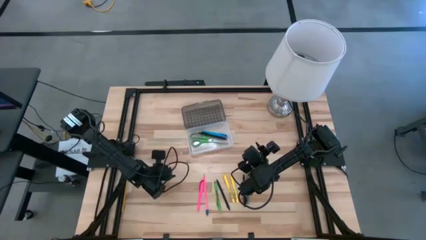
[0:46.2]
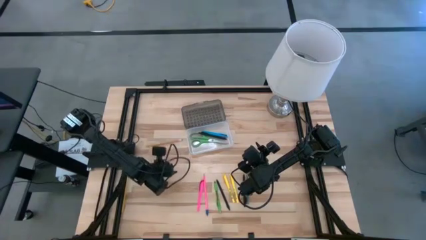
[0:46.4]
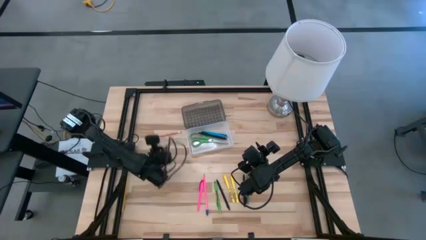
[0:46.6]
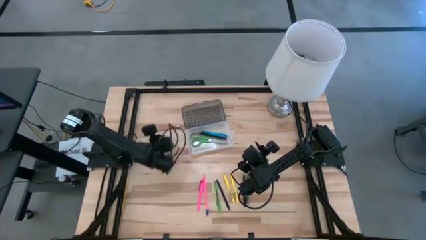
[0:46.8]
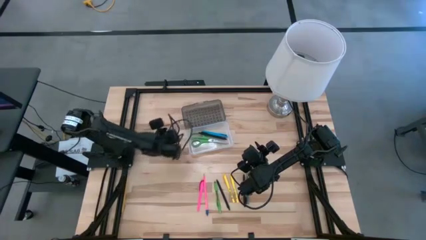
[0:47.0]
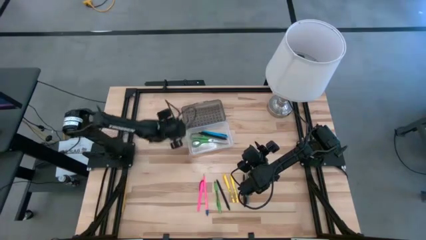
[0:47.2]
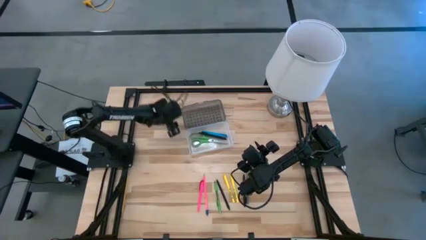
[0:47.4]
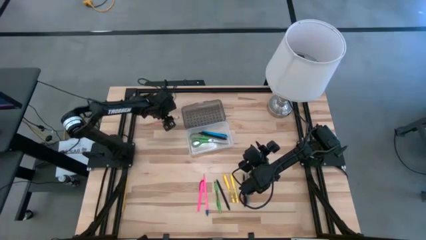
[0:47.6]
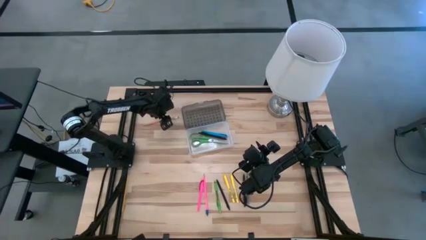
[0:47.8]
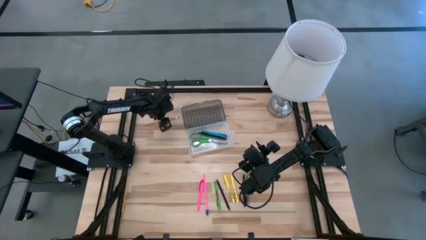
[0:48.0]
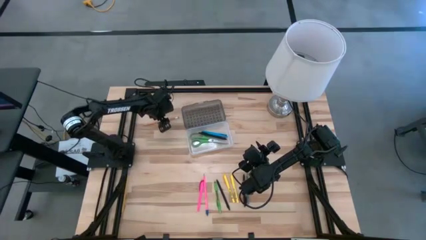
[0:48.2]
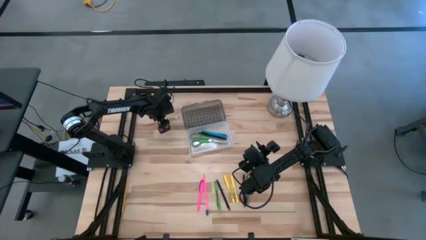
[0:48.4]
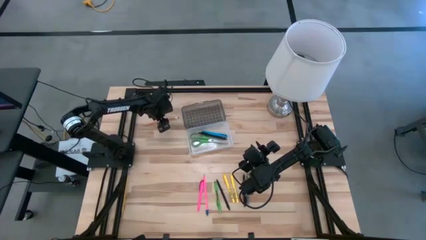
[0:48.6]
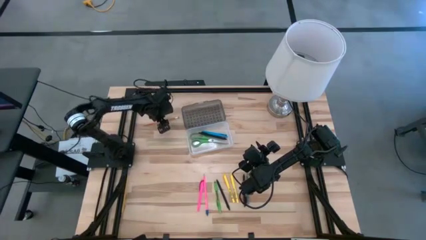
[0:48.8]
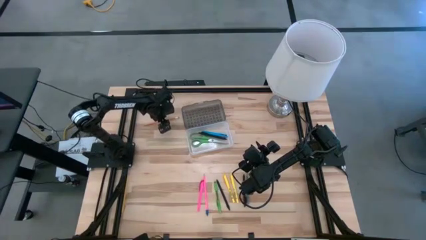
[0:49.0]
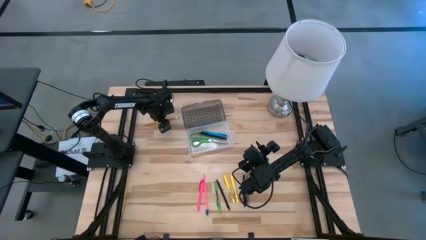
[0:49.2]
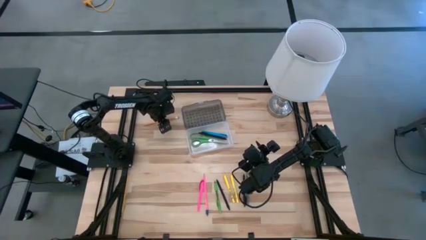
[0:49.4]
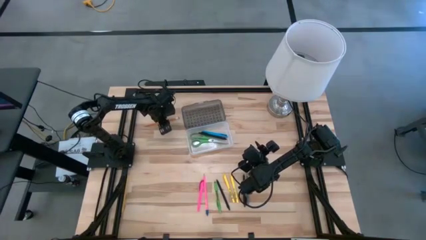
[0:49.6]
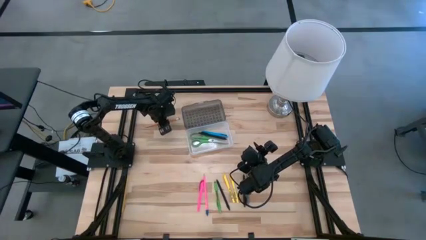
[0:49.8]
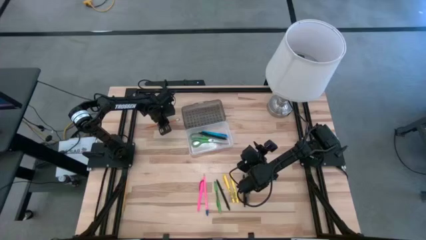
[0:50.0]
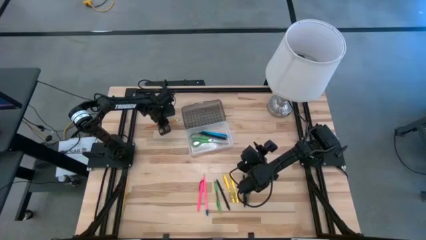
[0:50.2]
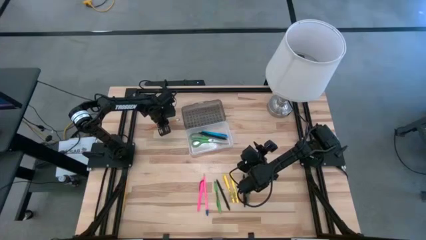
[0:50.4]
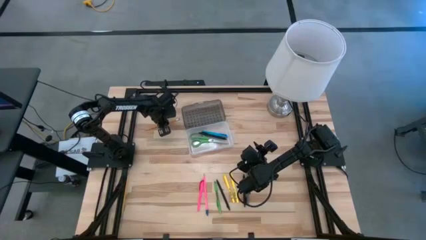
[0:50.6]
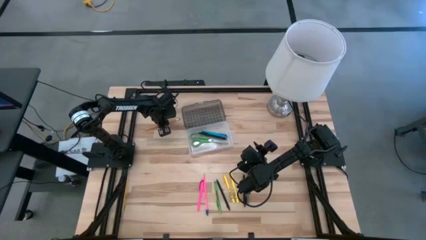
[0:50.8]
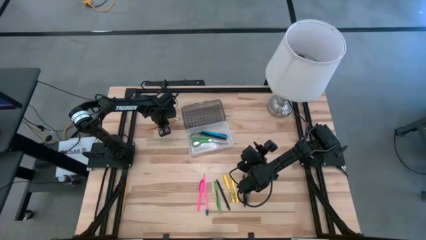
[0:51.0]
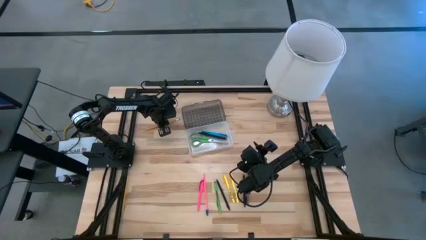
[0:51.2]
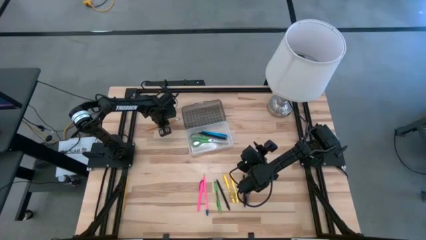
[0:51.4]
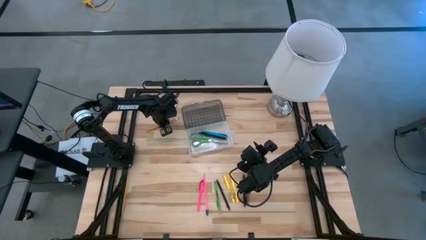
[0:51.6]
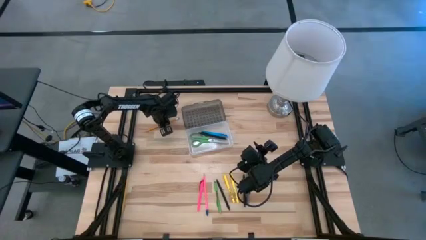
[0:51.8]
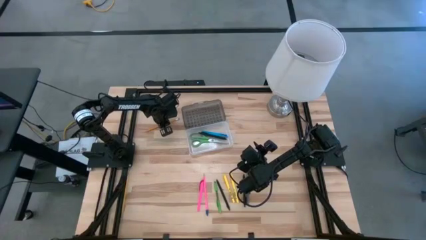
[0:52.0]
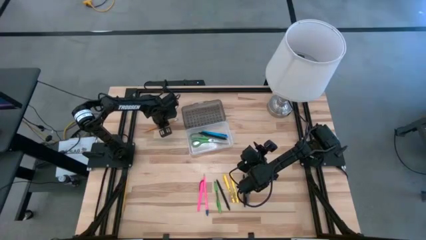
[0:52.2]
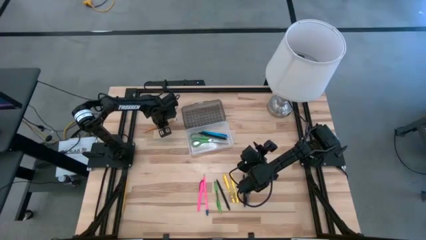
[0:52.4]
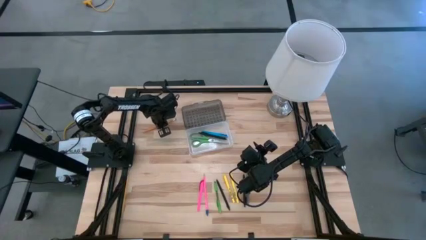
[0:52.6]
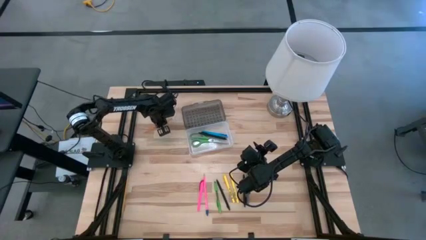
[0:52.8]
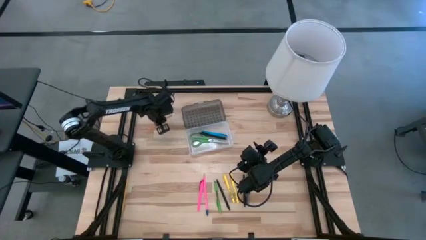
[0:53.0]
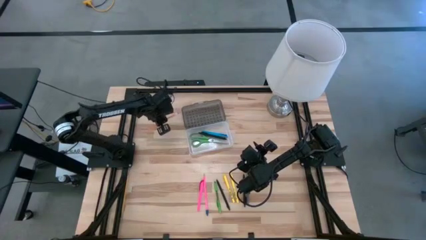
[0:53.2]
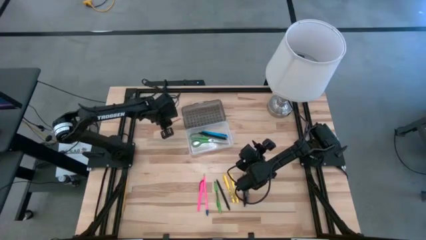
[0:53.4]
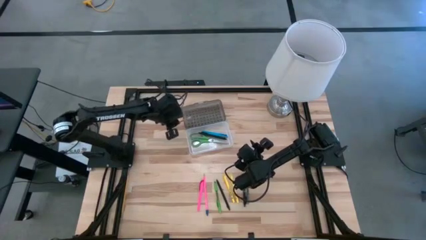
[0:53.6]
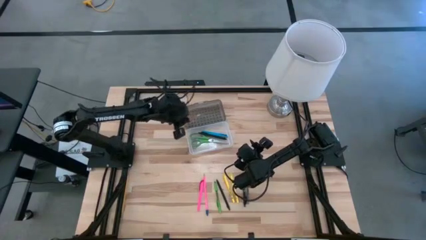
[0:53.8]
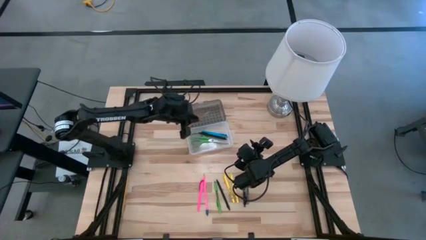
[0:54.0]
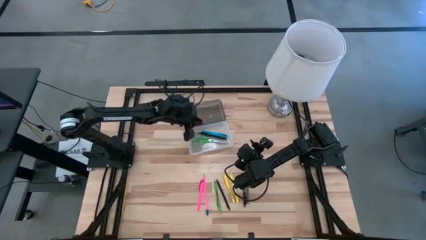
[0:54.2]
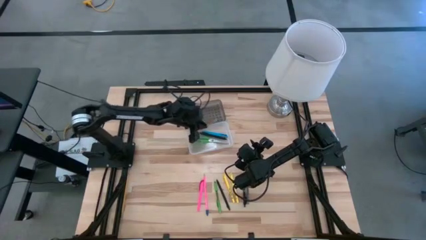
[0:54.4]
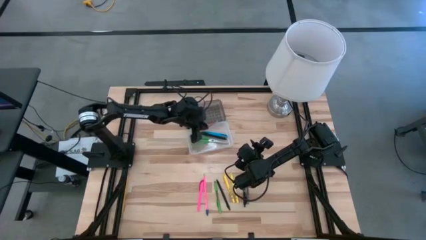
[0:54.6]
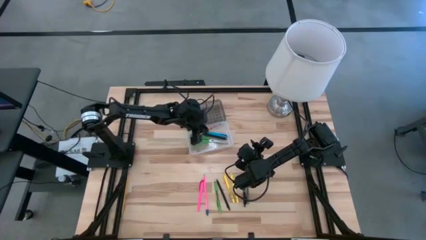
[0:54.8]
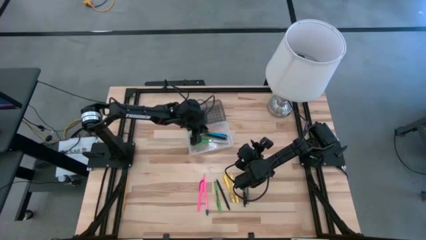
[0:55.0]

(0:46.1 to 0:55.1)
Task: Pick & place school supplies into a supply box
Put the orange pencil into the transparent supply box

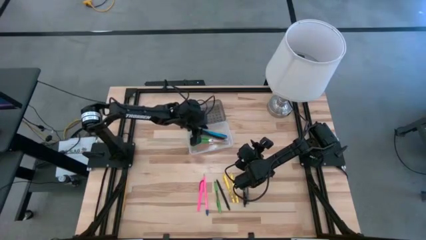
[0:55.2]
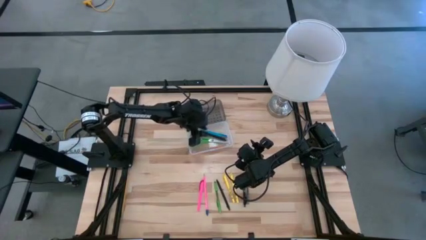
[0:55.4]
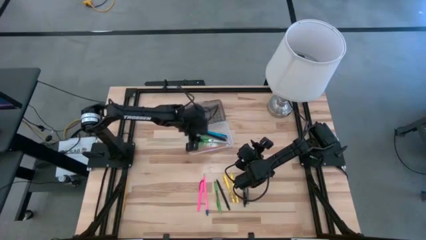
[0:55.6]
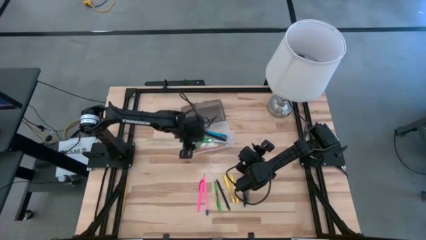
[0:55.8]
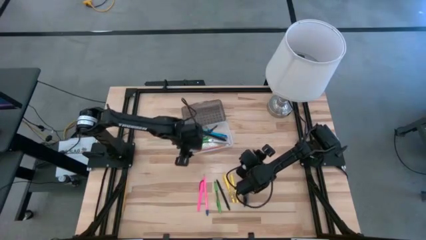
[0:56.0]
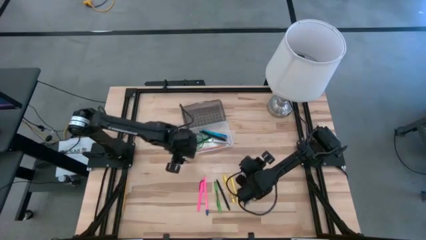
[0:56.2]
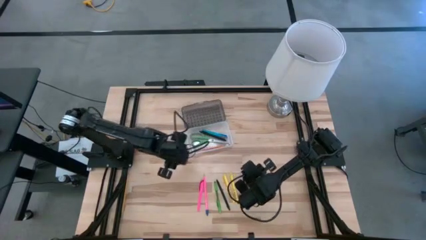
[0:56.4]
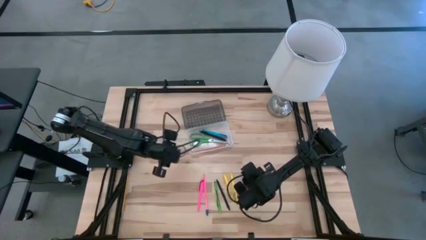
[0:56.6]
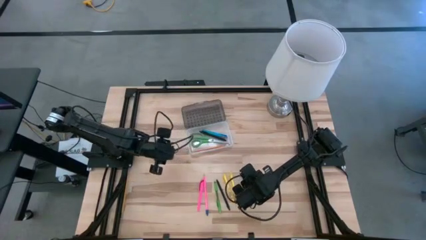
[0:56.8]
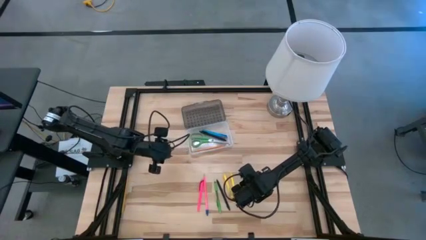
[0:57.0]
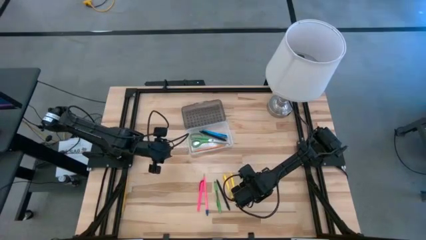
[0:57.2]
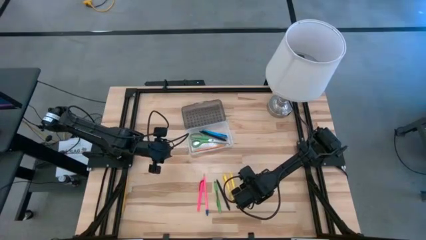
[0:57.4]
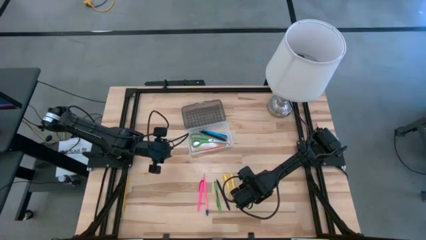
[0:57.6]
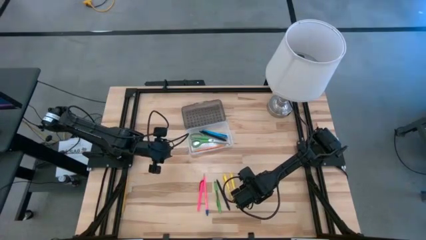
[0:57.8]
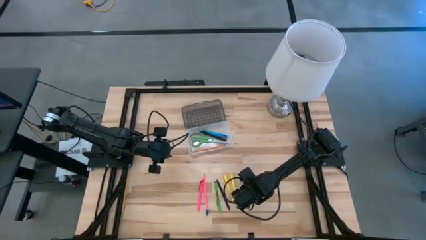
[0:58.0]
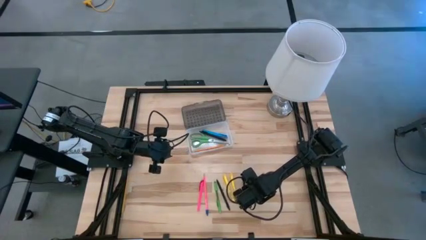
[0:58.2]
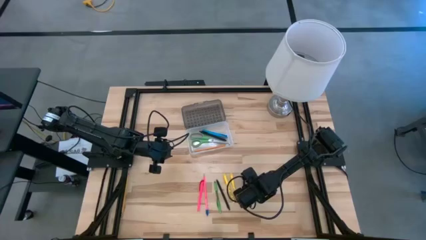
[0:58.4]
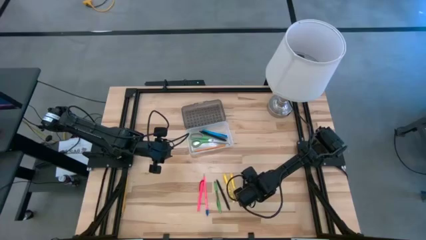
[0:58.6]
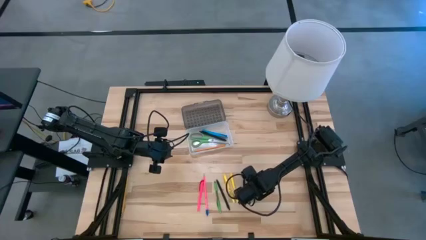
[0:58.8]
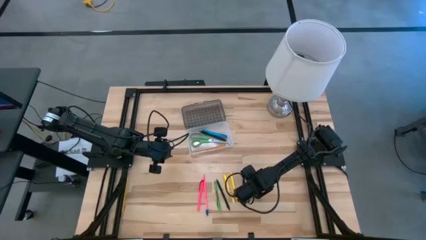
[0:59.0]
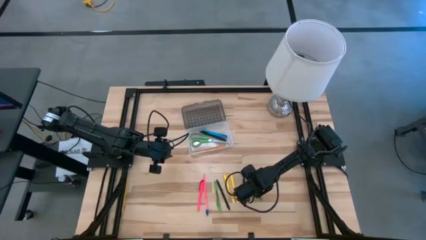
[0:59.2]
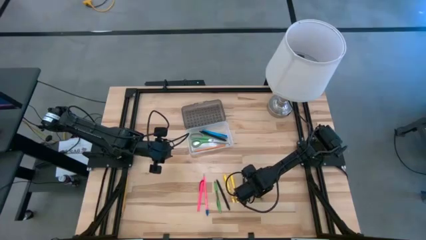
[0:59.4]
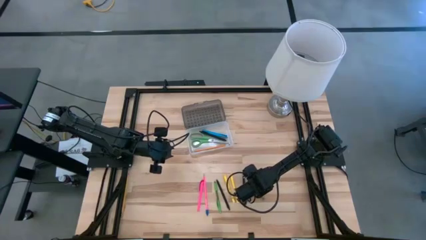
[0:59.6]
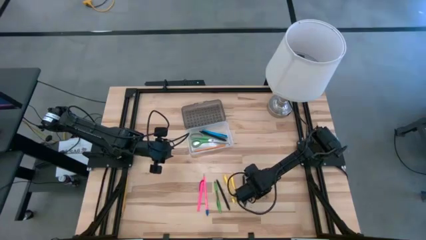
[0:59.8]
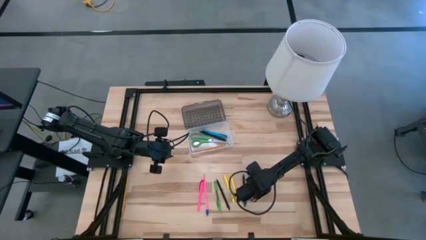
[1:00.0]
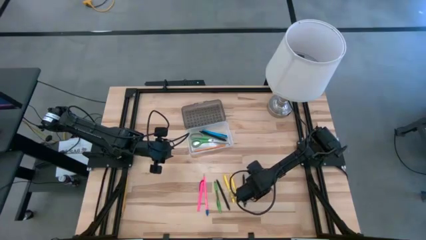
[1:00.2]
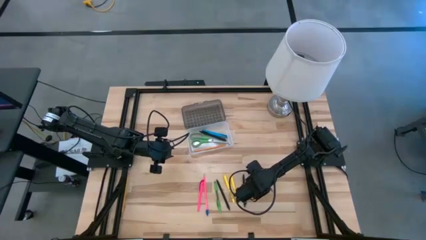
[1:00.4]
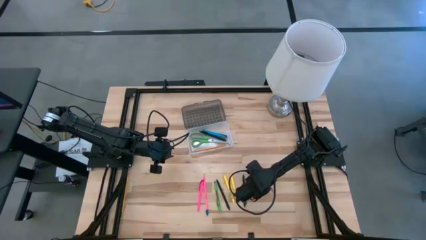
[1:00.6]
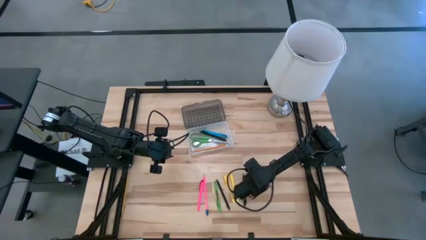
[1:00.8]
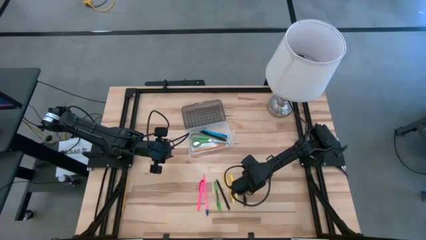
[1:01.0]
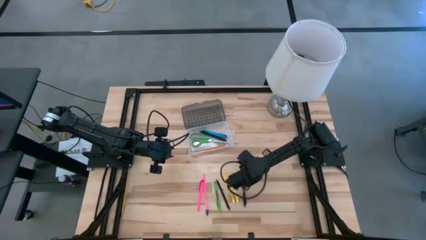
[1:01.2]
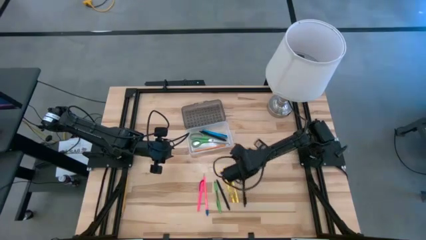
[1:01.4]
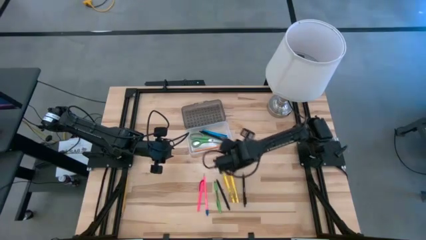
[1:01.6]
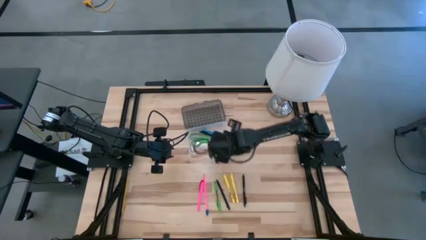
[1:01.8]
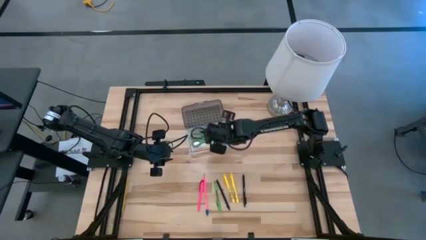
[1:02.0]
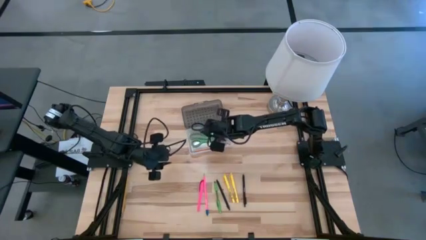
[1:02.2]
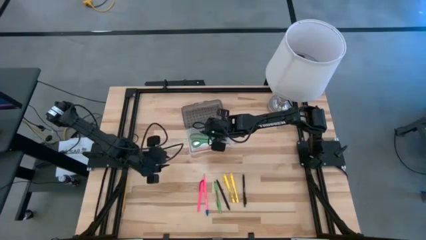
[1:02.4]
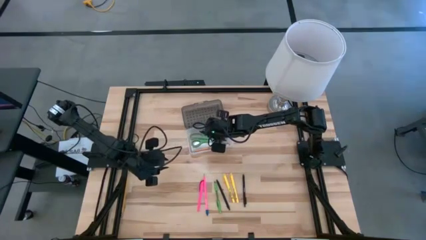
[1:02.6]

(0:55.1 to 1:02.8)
Put the gray pen into the transparent supply box
